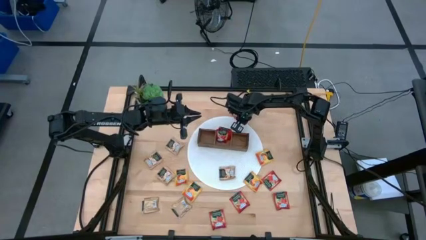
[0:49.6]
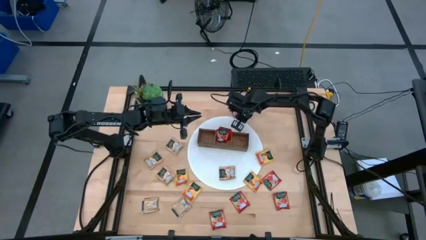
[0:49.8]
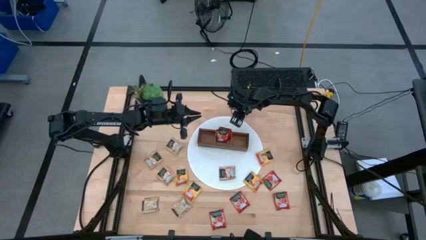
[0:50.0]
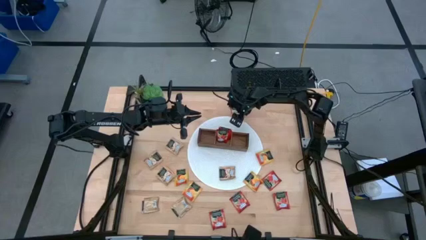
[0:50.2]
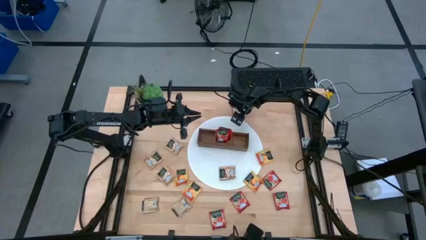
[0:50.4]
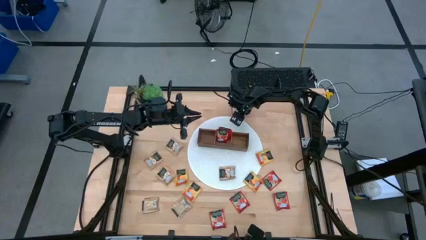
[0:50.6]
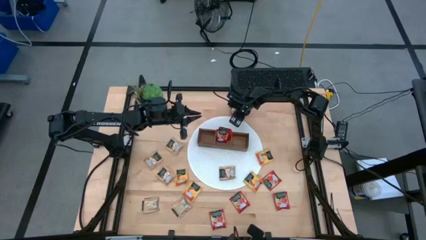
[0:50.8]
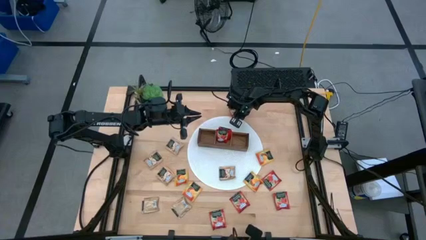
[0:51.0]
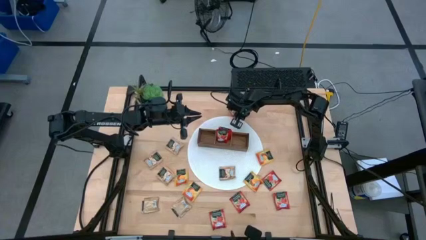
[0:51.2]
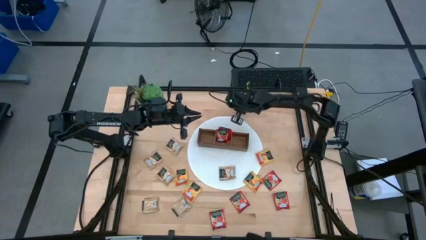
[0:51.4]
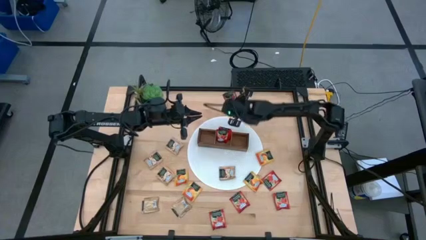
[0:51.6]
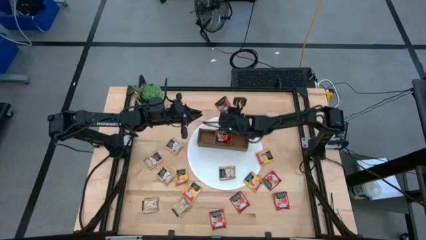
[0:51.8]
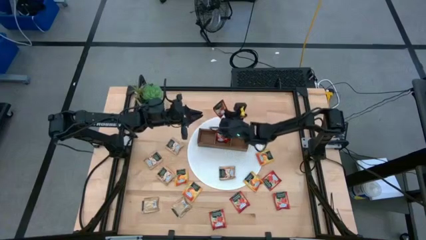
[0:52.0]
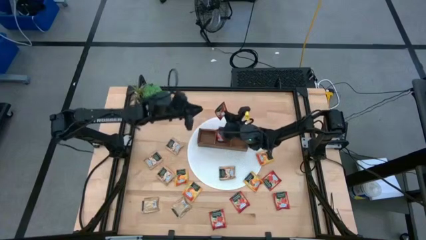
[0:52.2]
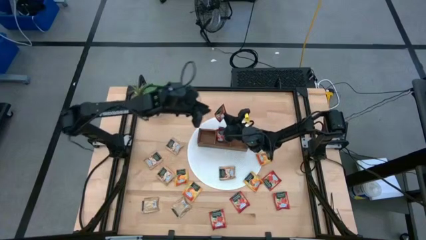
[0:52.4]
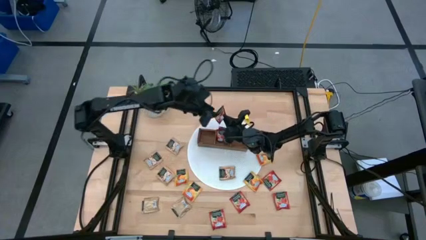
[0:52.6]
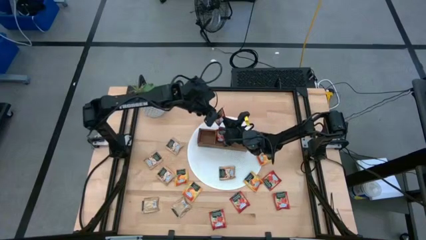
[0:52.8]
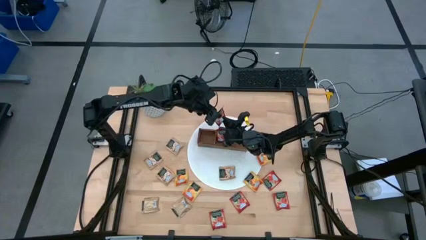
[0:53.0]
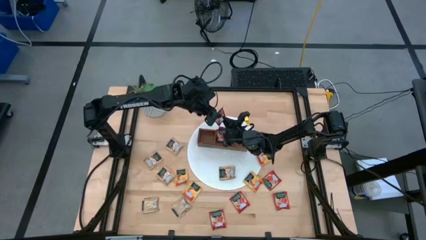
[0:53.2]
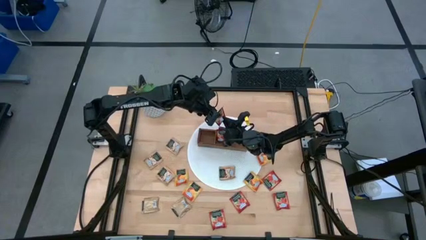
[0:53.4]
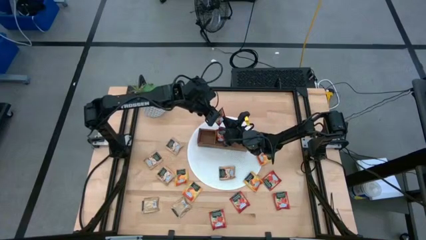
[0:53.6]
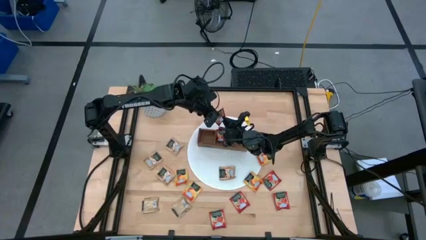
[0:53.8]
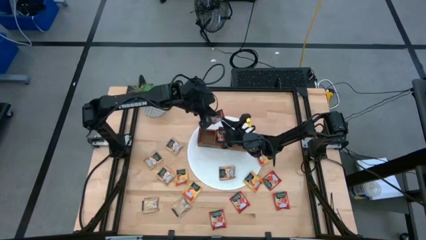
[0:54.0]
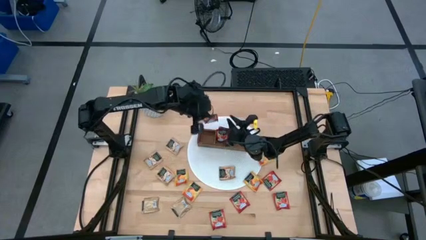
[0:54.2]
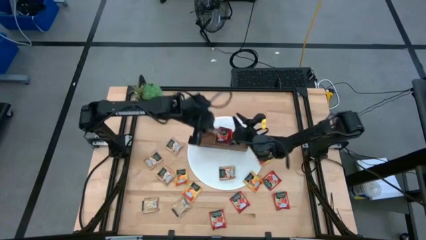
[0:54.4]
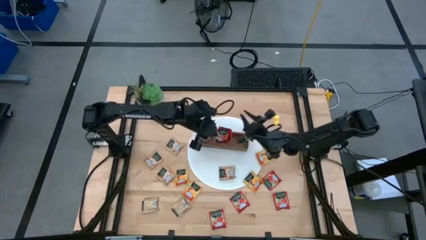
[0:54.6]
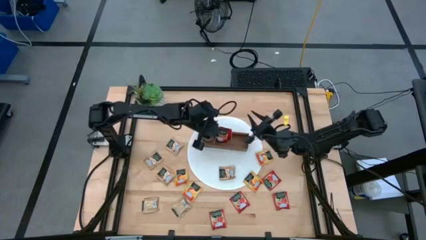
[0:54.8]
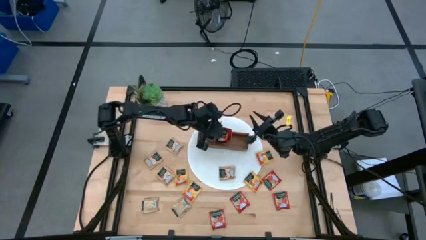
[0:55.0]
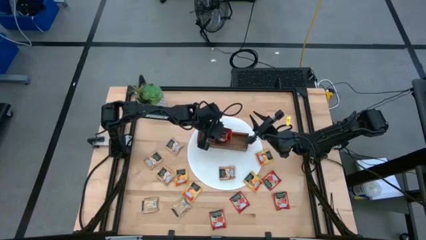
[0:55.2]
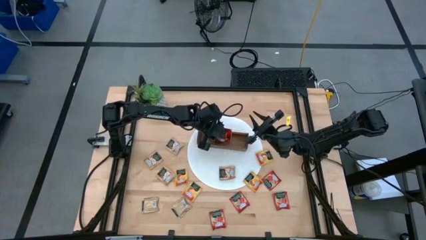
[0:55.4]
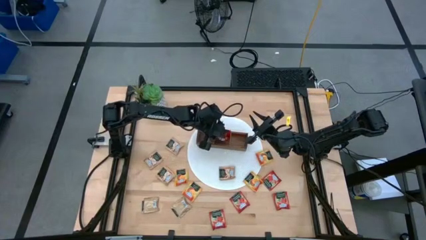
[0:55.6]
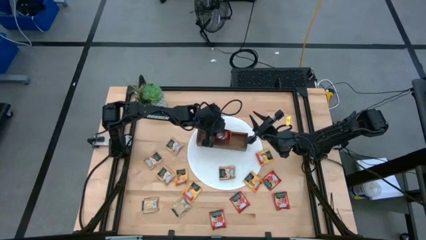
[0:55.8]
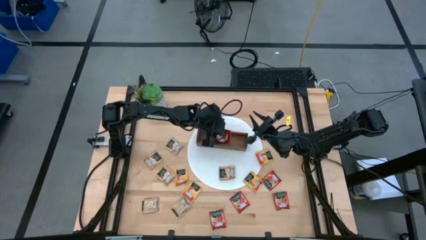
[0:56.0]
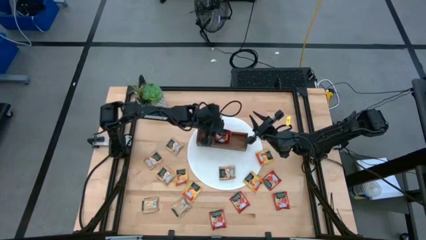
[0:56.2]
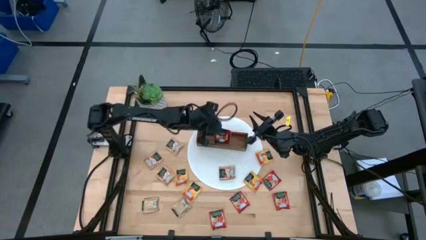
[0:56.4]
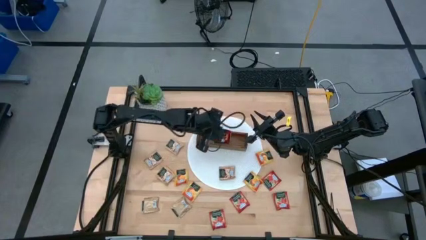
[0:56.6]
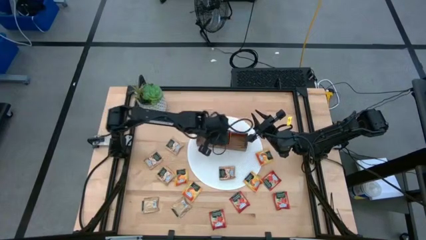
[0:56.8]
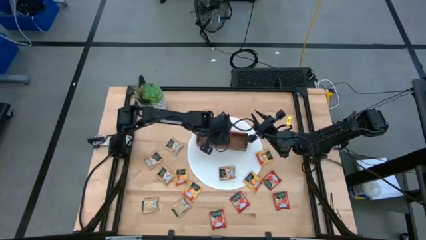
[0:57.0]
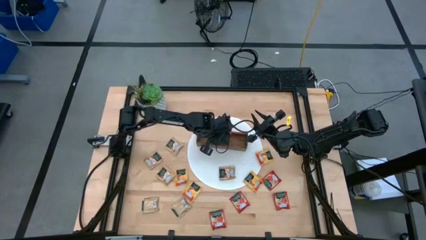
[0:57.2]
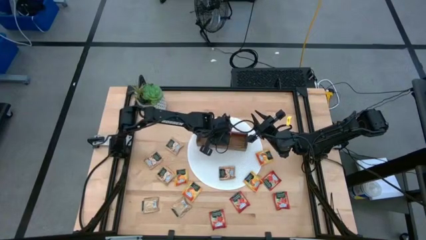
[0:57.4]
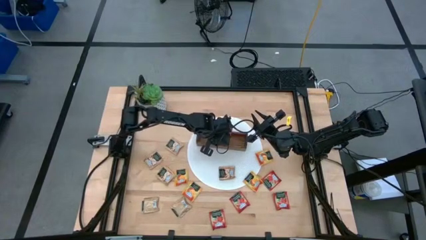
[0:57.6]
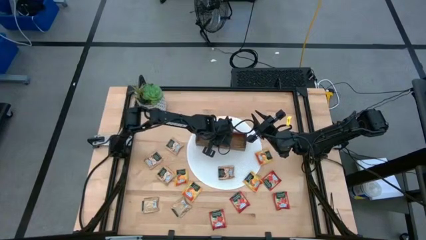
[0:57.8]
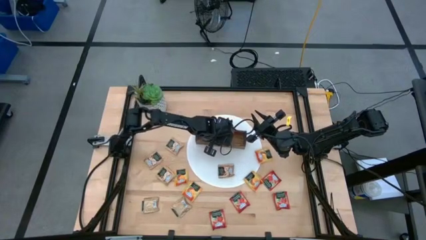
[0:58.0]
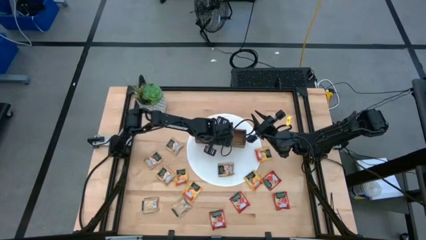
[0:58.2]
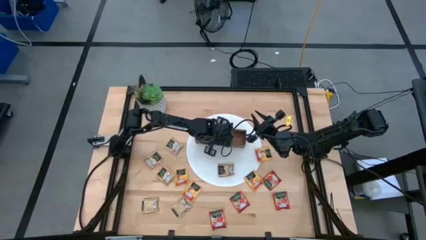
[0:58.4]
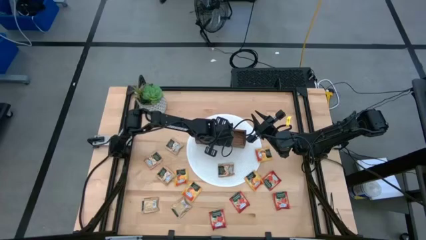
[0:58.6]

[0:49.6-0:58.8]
Task: Pick & Place Tea
Put the red tea bag into the middle section of the wooden organizer

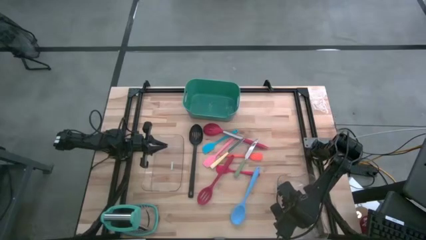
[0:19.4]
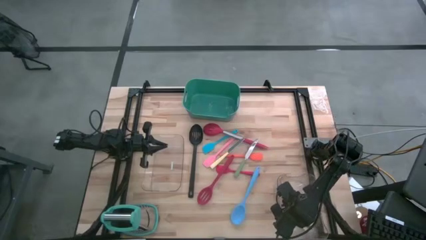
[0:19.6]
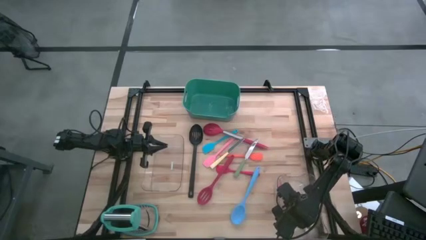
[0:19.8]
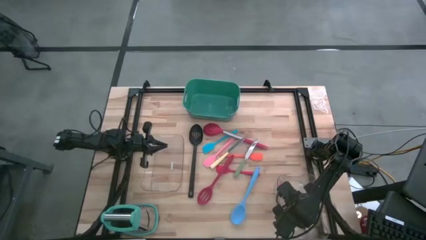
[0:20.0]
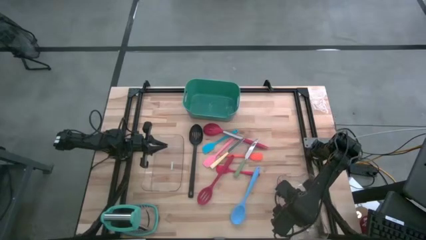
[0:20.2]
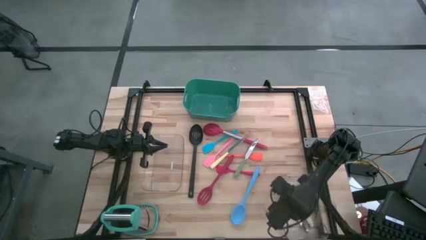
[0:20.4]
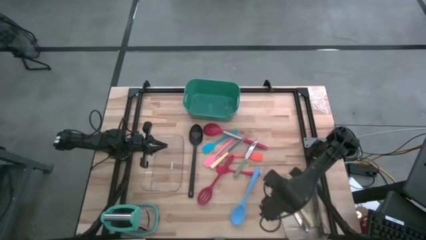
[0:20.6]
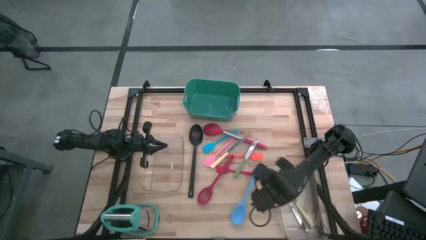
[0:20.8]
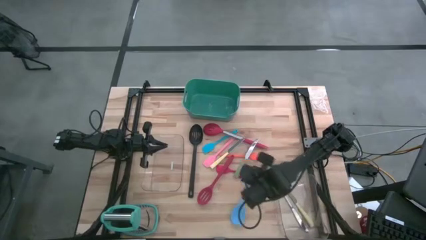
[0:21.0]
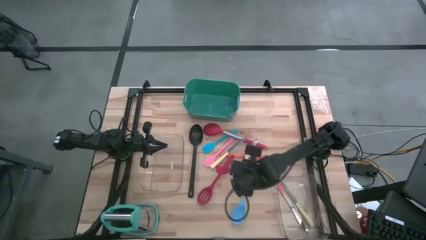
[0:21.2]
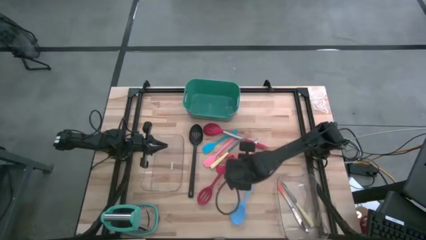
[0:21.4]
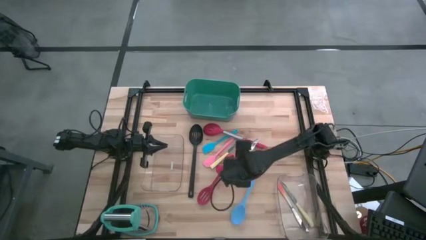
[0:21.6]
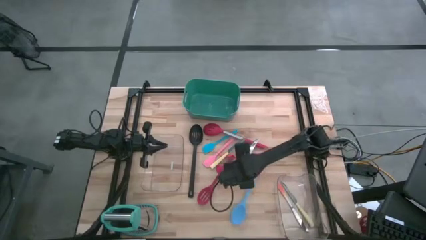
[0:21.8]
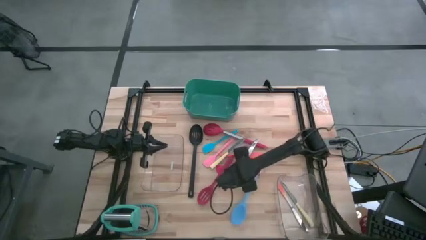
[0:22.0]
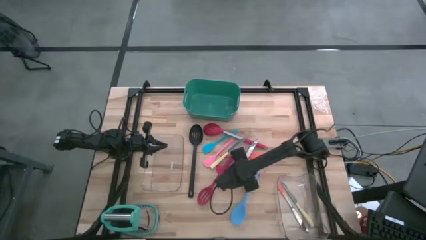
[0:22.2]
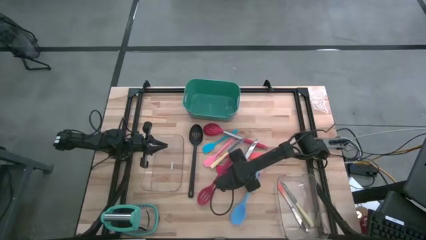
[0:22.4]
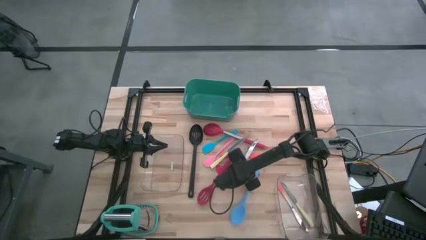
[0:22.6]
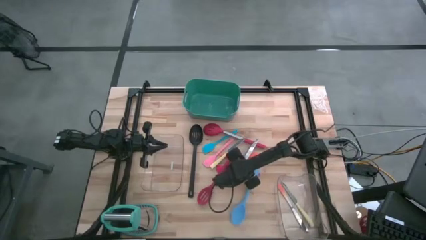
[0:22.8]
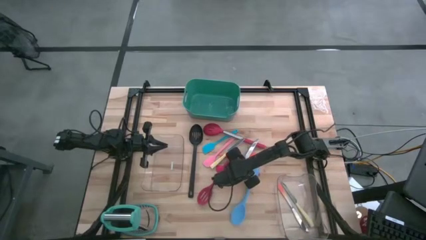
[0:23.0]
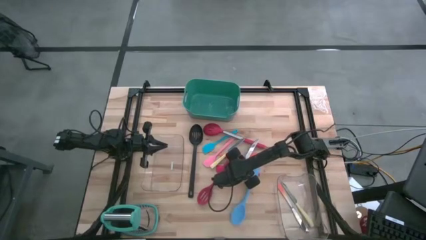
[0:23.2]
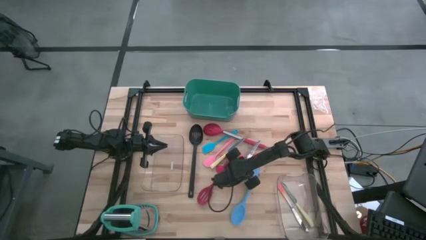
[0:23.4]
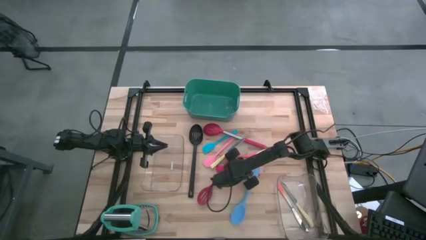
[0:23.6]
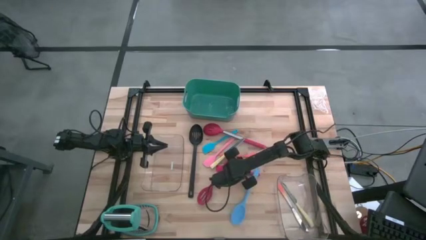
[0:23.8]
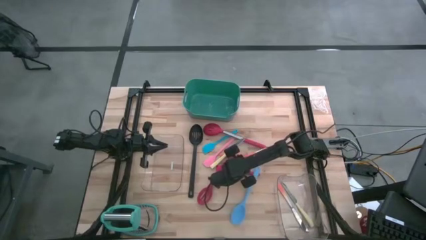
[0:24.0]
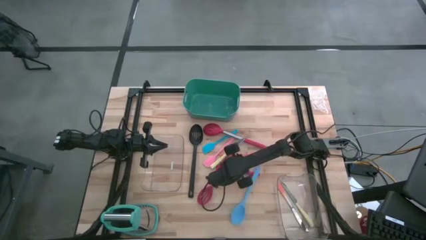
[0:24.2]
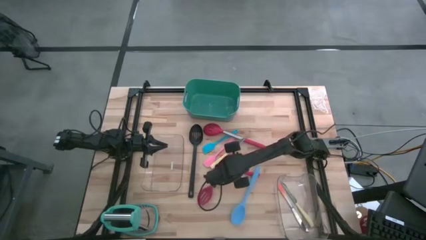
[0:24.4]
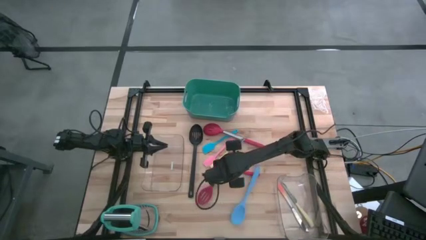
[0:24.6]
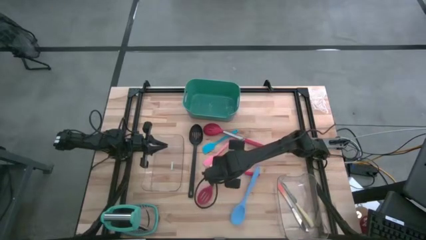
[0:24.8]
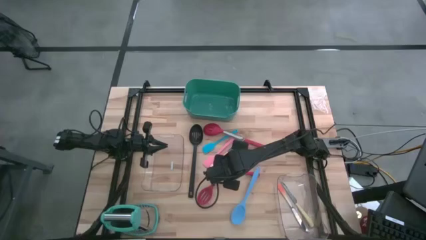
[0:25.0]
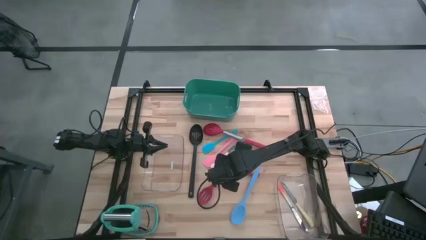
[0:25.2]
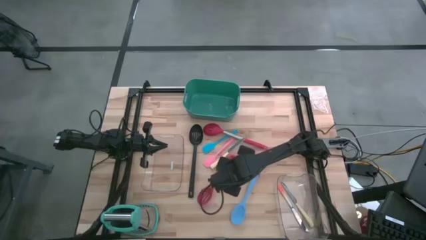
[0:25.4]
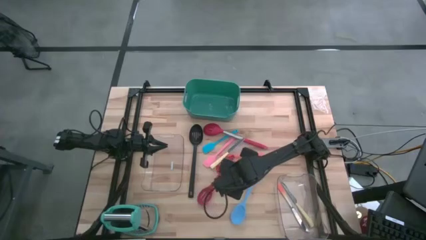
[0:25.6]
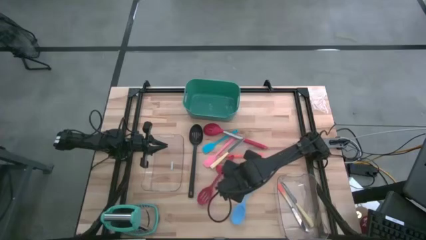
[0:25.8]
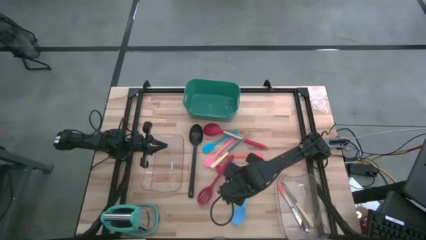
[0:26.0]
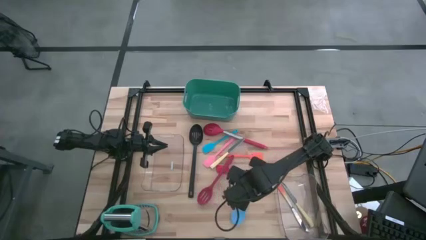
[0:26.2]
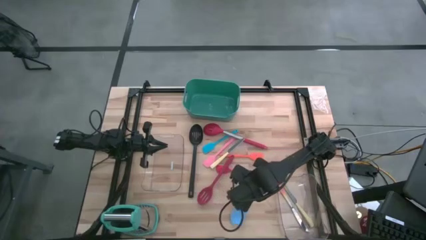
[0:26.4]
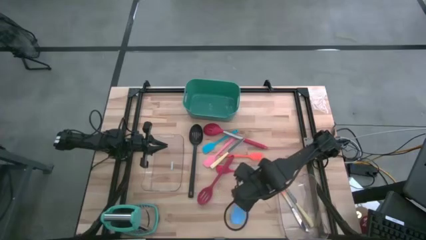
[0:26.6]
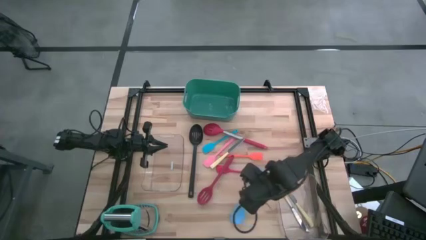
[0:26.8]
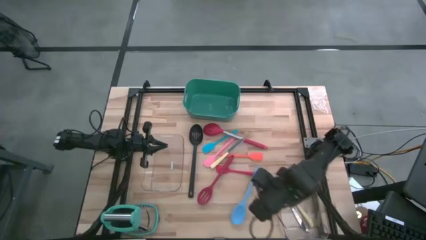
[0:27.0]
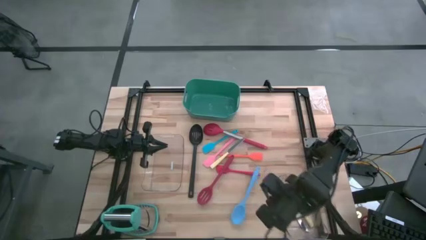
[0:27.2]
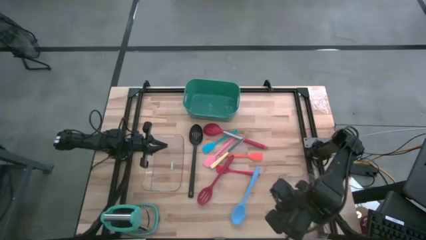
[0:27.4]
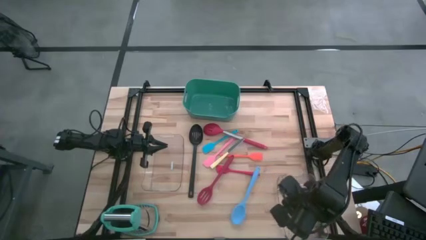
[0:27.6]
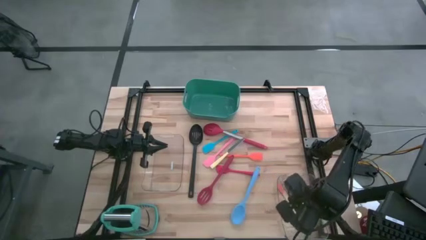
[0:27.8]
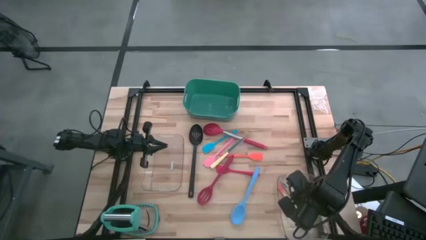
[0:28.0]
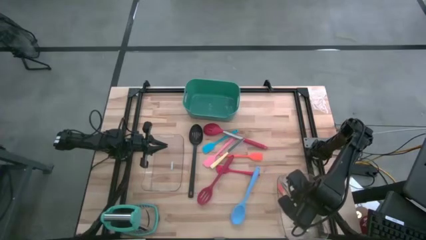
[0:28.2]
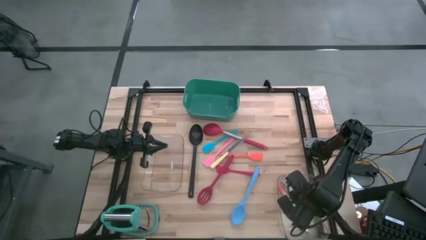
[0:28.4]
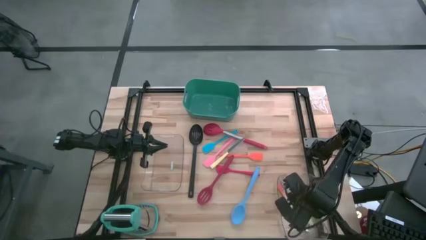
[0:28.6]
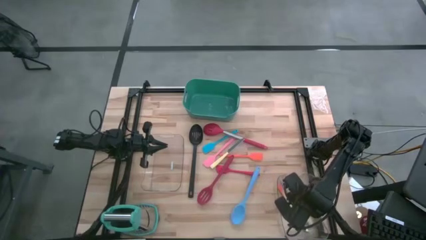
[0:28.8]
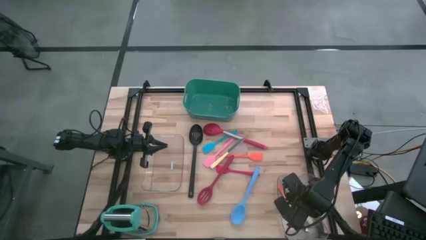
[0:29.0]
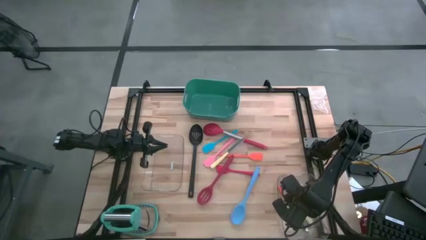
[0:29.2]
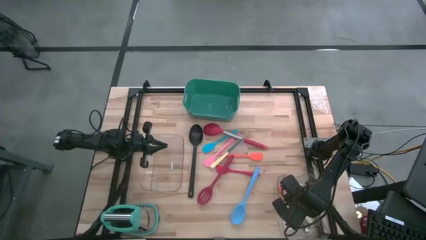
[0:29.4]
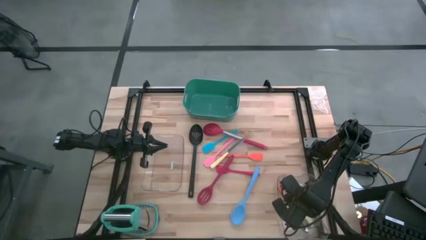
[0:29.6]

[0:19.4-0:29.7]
Task: Pick & Place Kitchen Items
Put the green knife into the right transparent bin
